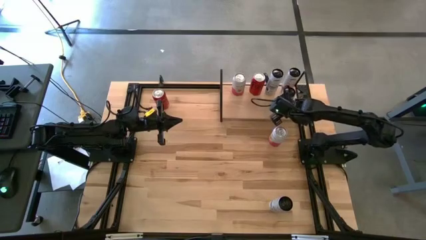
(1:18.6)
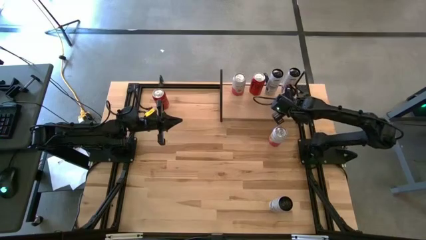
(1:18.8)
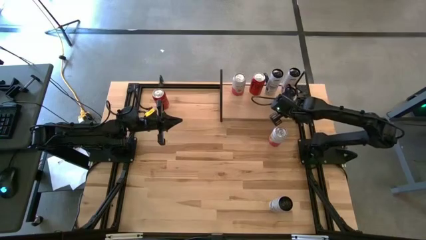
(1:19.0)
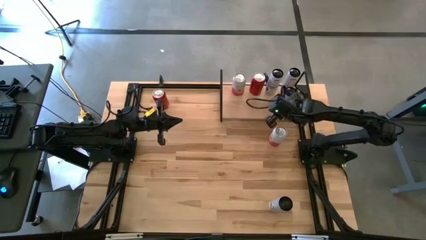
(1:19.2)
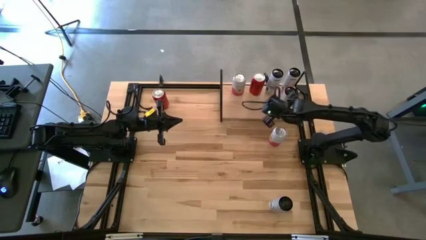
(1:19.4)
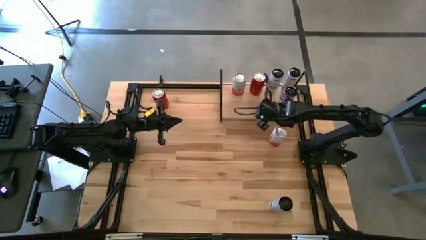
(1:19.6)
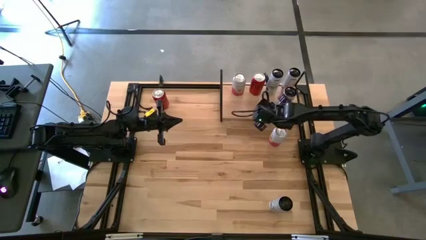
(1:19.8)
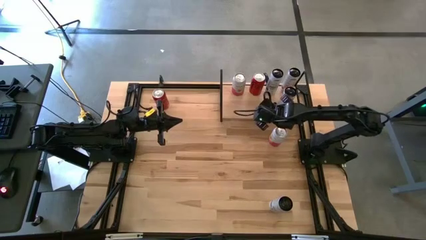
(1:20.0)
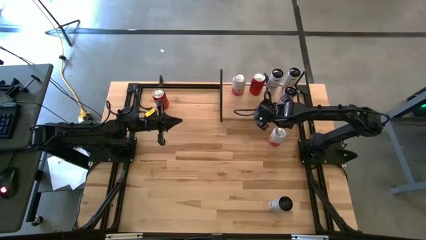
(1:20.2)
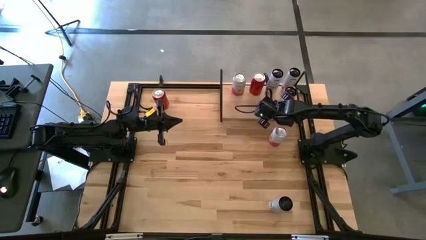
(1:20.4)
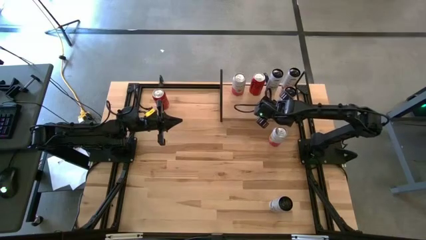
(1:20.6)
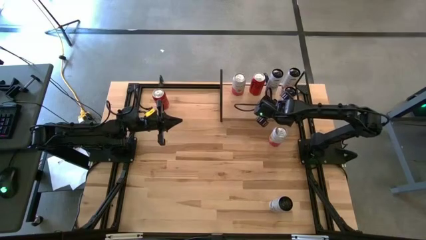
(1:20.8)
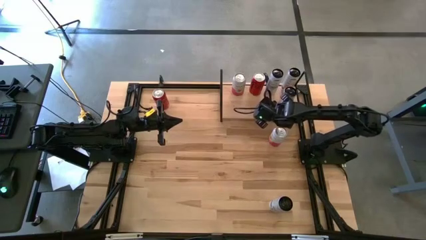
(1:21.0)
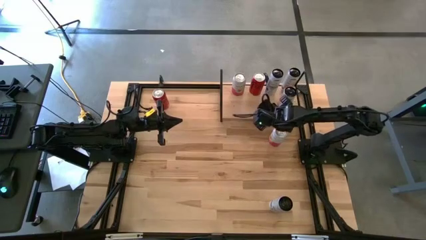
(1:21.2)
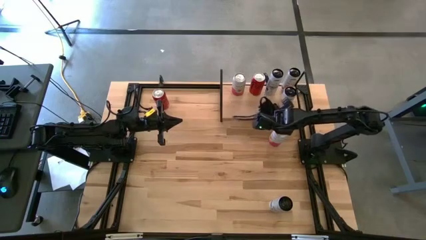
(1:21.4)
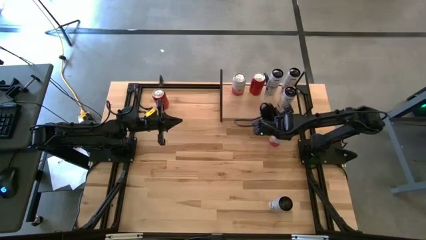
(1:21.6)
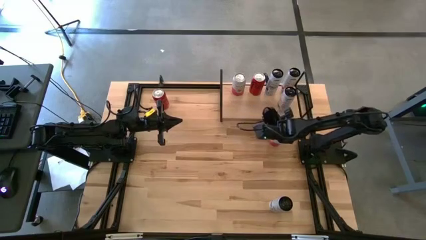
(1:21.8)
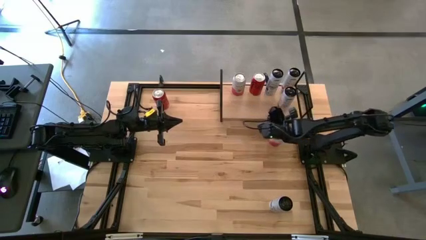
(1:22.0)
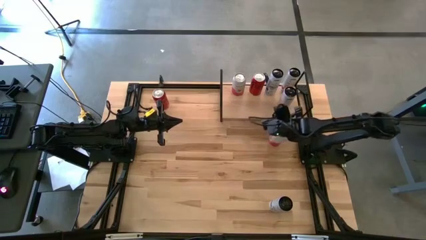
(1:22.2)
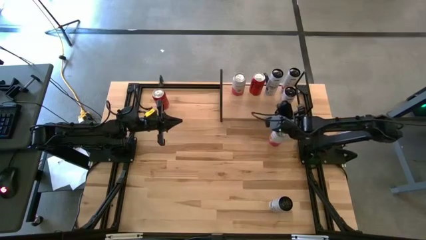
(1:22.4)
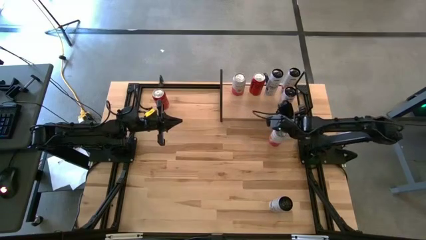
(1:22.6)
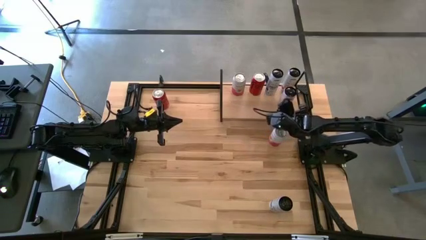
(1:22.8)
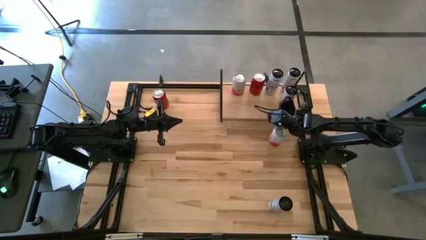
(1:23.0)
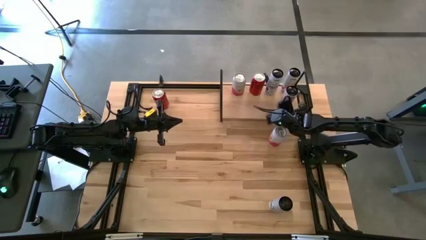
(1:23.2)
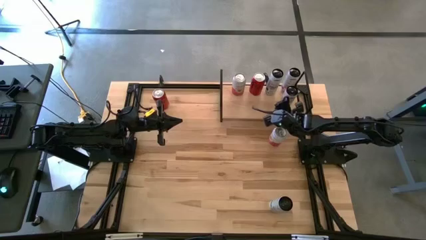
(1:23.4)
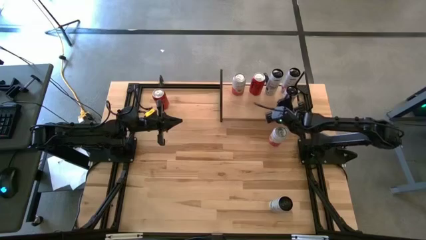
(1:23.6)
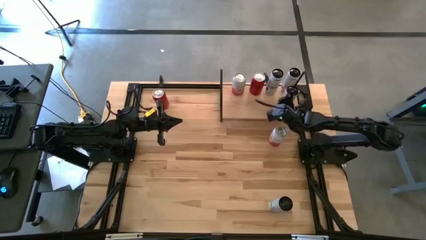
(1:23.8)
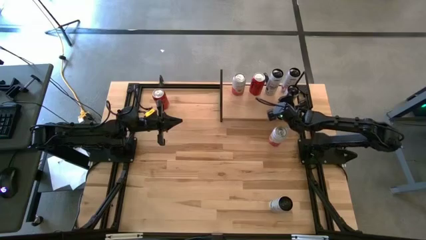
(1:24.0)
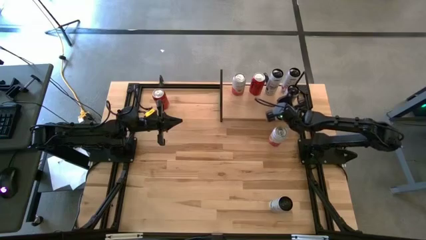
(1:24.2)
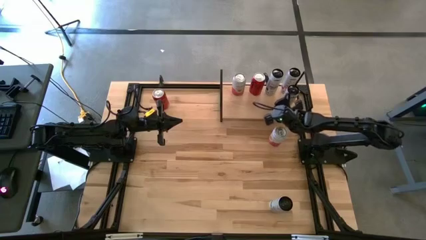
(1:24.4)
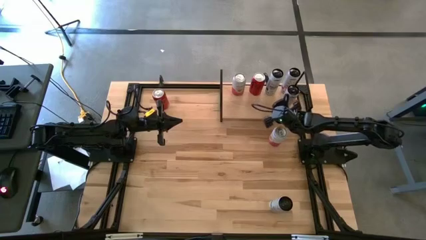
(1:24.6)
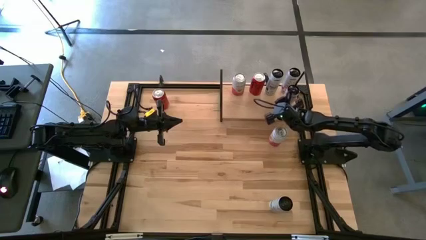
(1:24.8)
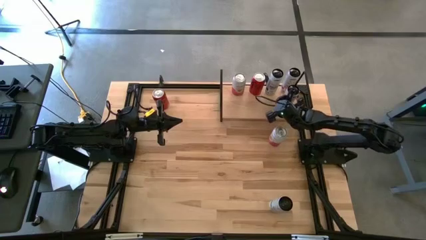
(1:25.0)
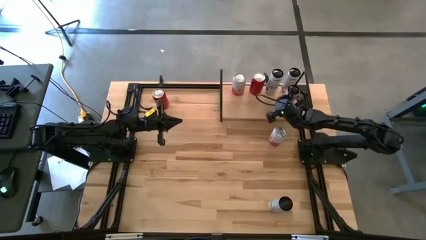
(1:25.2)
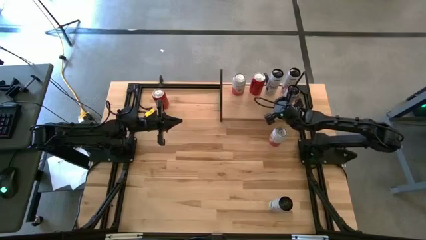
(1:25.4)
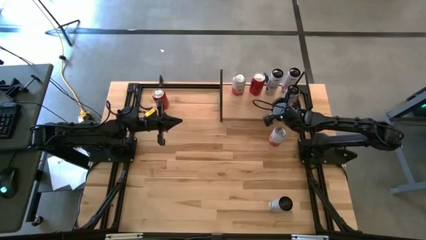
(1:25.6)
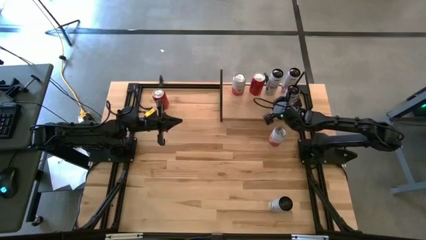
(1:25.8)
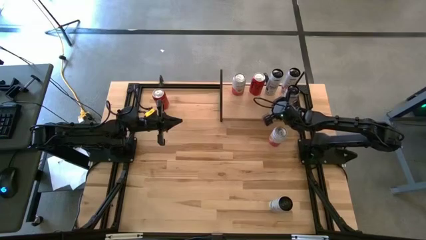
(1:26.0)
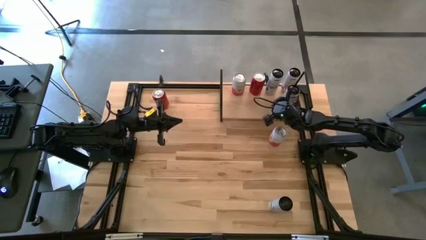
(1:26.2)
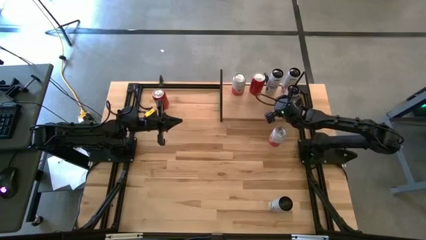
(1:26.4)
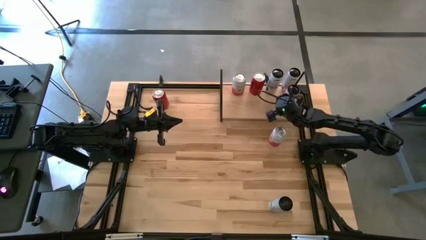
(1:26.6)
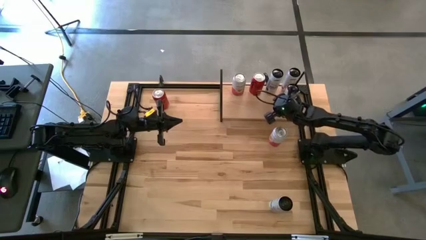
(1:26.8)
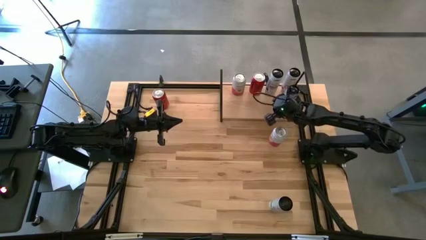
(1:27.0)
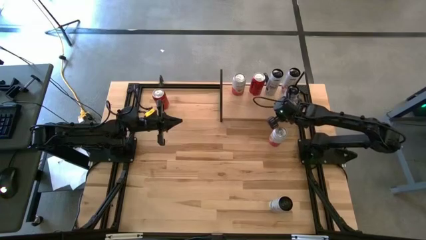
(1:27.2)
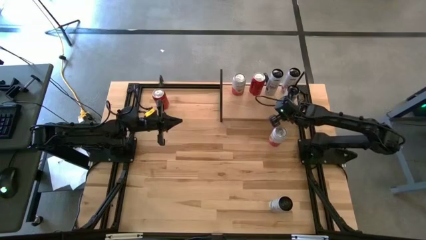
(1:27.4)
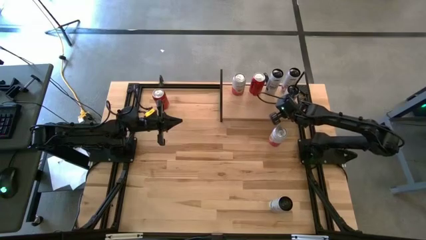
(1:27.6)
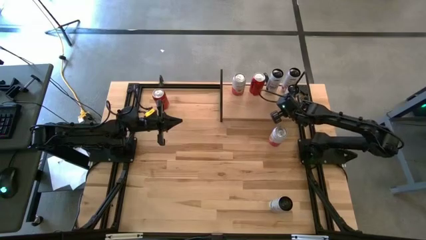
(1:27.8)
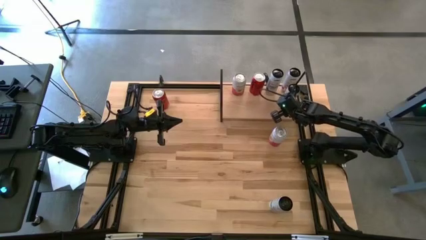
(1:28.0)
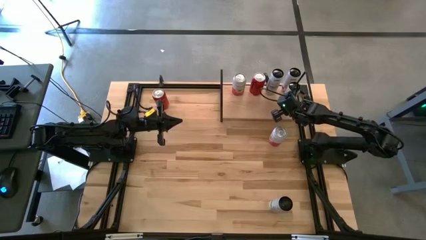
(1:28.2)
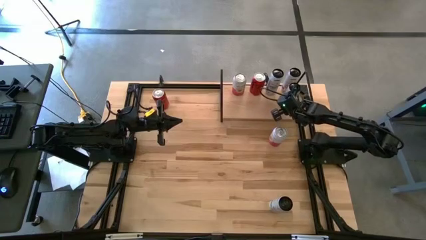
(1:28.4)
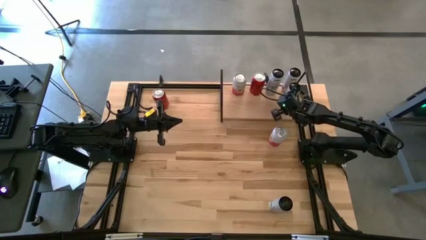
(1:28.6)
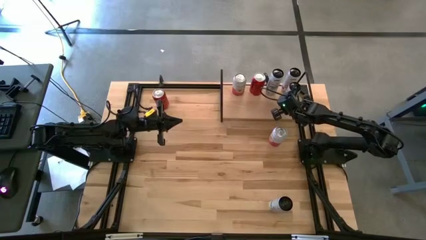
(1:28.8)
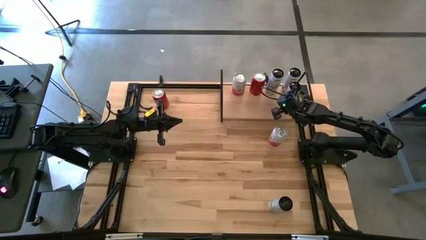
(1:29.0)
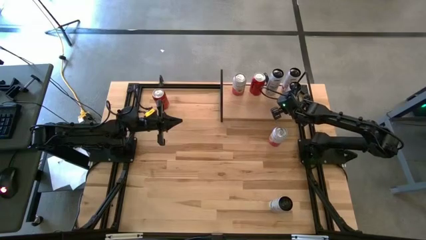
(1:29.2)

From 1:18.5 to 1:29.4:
Task: Place canned beverage on shelf
Put the white and pink soda can on the shelf aligned with the other white and pink soda can

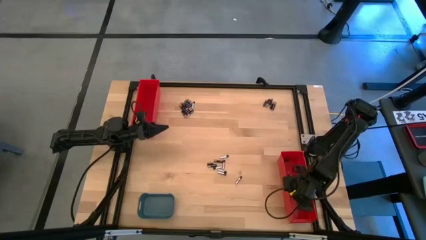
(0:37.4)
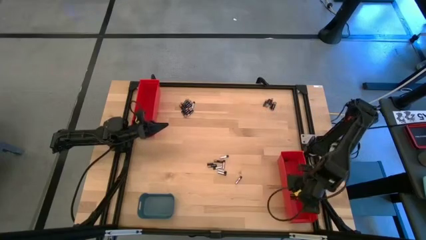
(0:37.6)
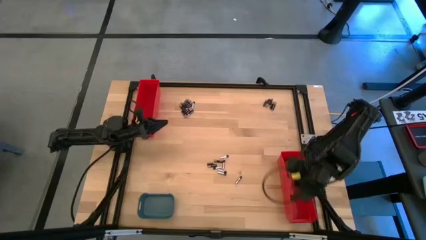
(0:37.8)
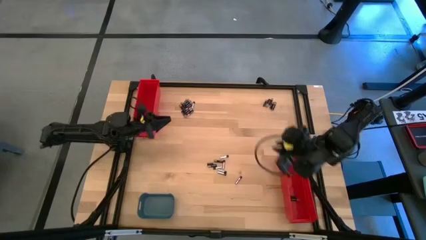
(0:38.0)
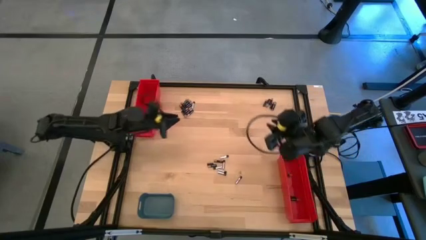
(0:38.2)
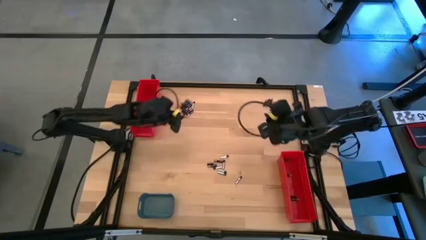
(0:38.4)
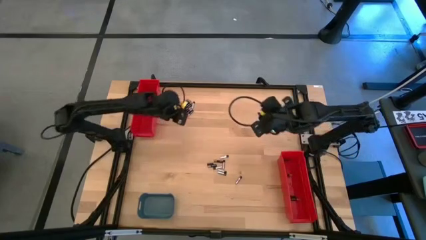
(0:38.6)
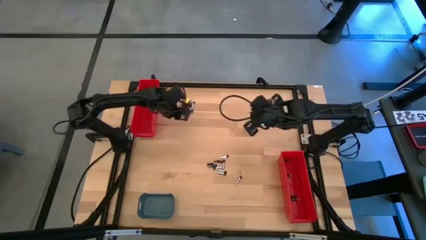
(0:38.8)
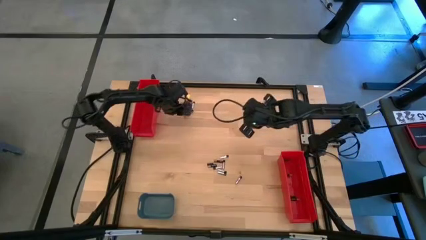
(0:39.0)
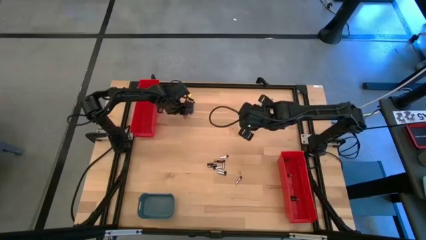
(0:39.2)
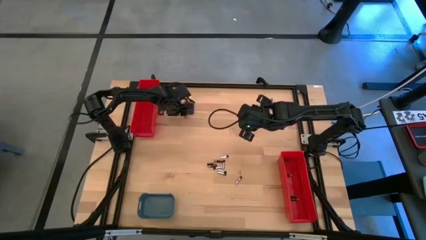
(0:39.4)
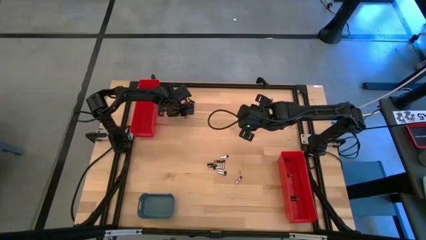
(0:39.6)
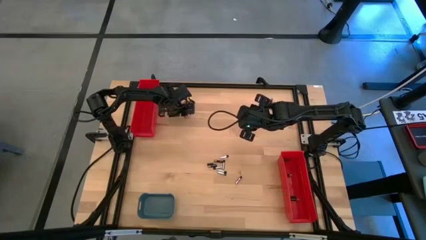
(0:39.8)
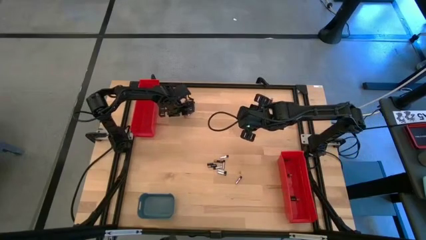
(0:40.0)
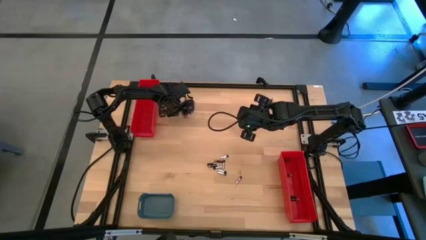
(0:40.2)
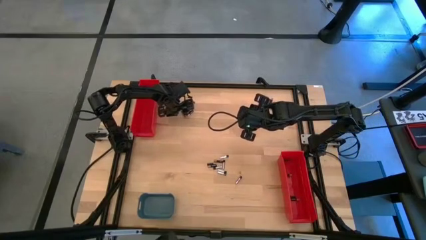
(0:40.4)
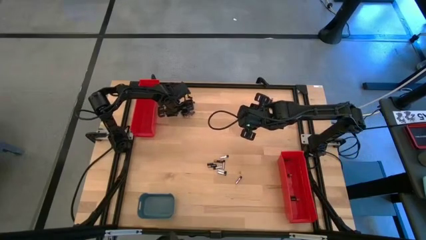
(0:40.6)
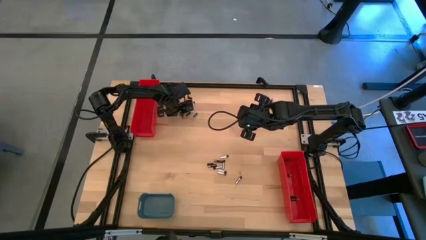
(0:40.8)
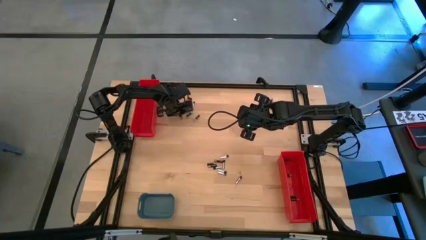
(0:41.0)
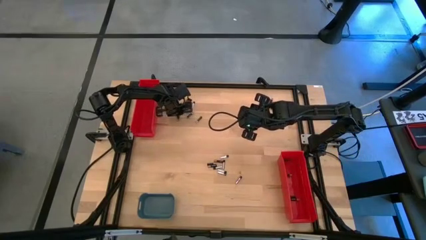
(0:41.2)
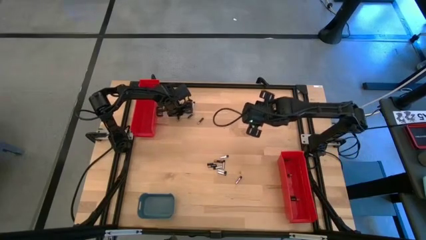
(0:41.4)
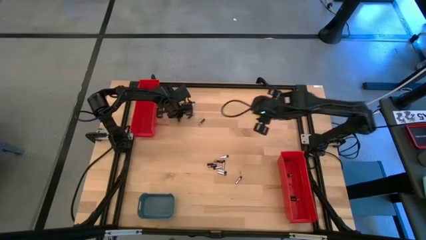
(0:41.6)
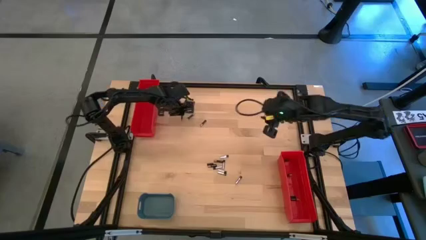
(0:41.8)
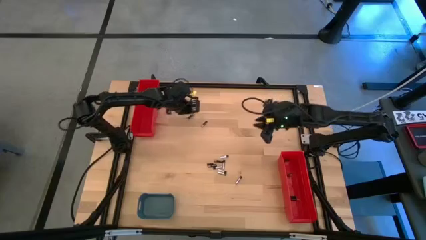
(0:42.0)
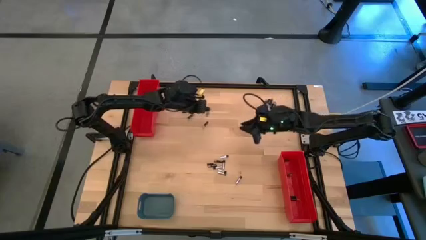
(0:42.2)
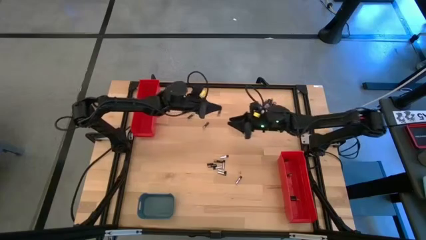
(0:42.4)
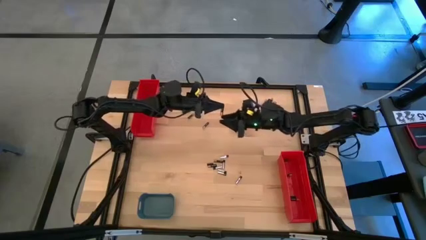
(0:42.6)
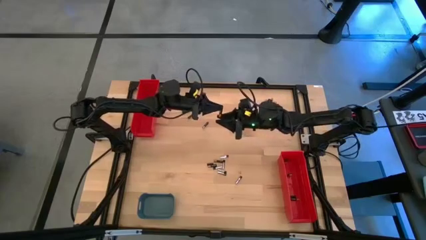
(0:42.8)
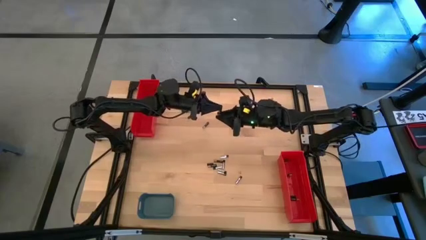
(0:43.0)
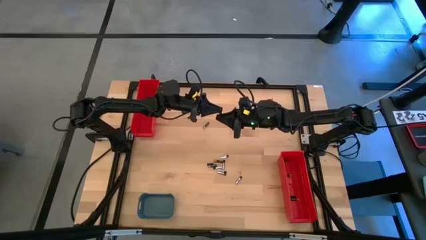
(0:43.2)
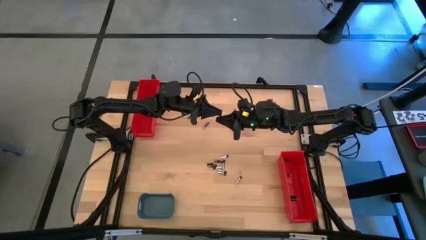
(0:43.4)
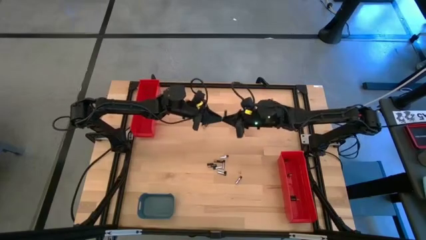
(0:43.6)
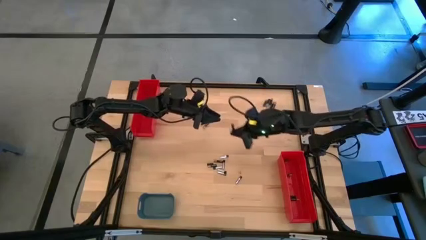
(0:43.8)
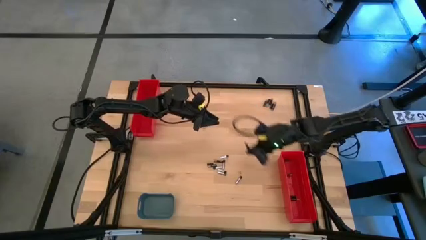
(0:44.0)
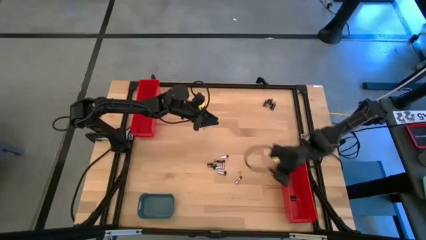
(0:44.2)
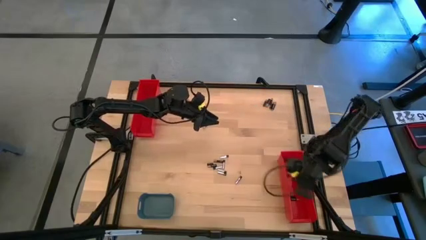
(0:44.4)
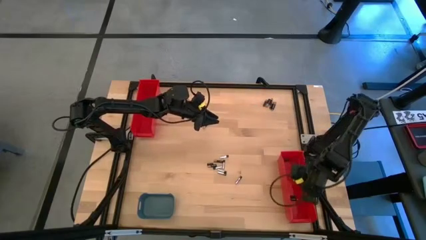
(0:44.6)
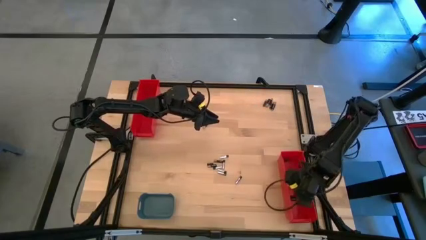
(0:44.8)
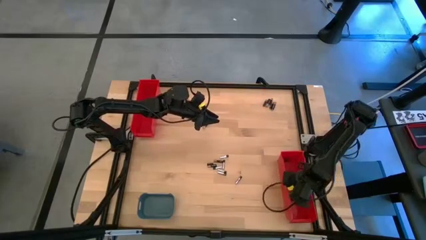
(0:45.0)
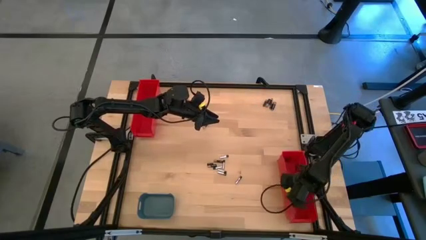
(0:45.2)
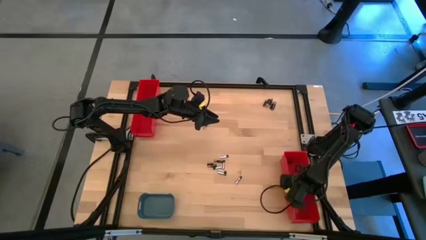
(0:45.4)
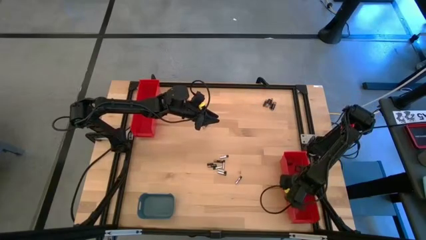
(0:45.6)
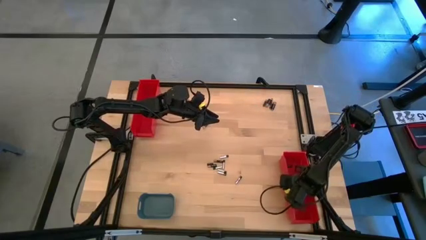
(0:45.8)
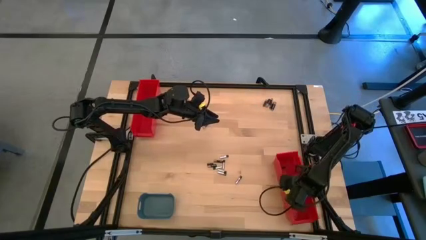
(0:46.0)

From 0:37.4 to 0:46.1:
Task: Sort batteries
Put the small black battery into the bottom red bin
